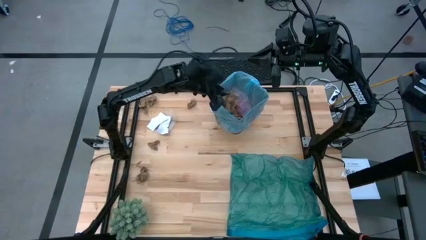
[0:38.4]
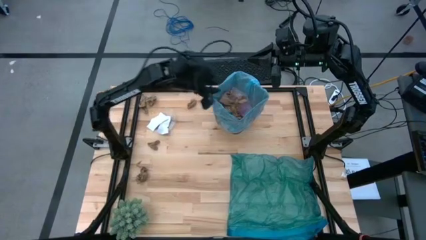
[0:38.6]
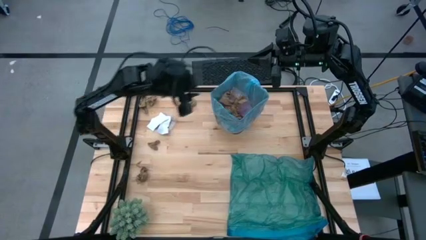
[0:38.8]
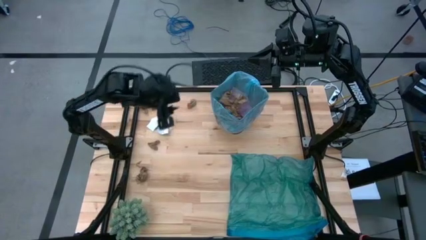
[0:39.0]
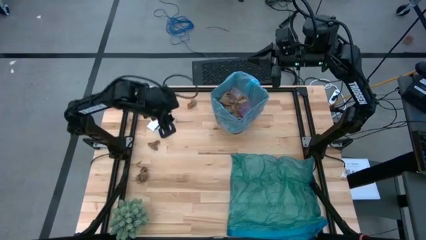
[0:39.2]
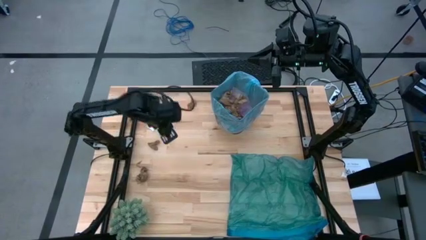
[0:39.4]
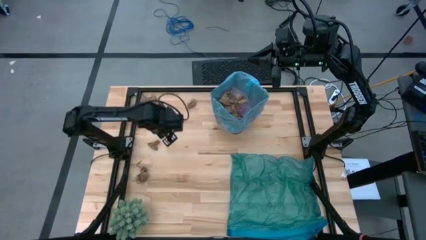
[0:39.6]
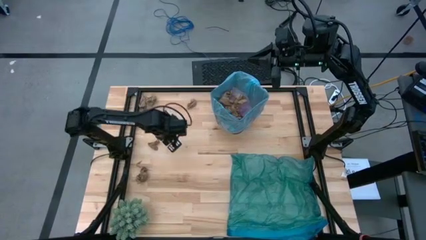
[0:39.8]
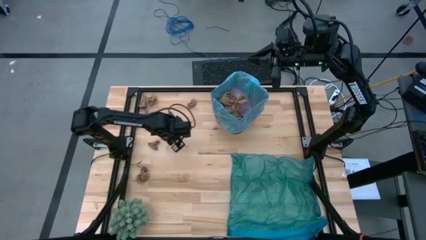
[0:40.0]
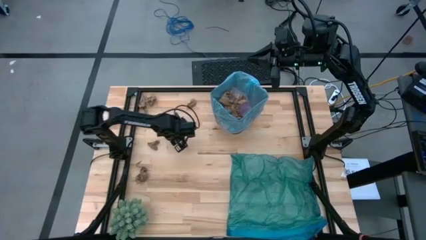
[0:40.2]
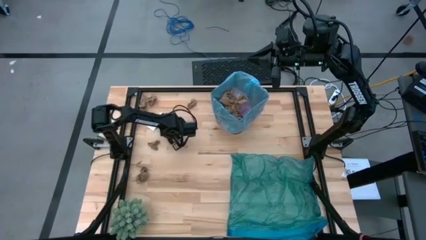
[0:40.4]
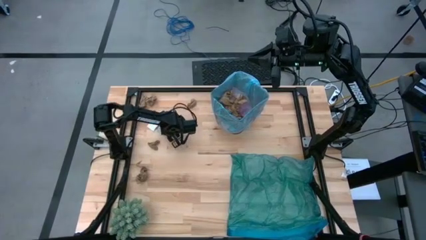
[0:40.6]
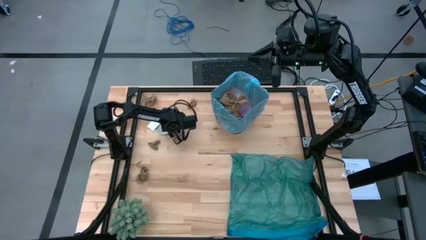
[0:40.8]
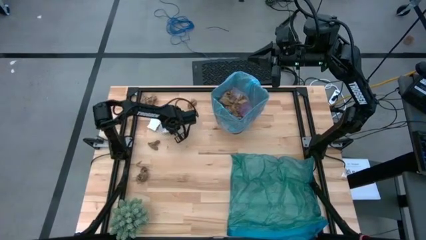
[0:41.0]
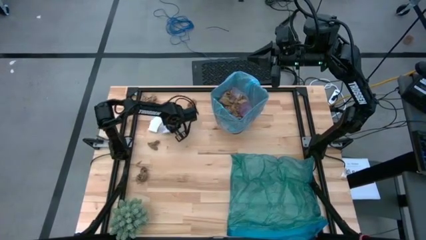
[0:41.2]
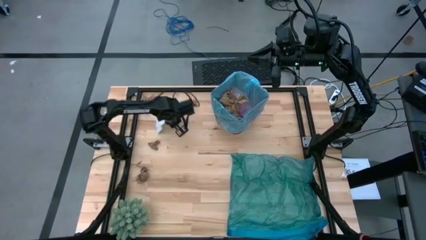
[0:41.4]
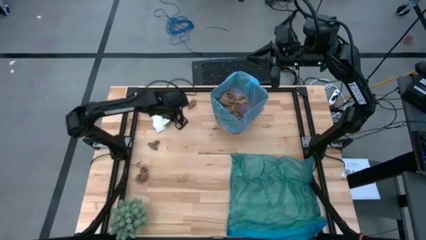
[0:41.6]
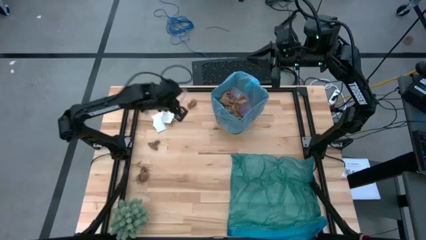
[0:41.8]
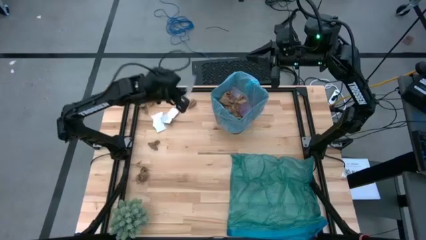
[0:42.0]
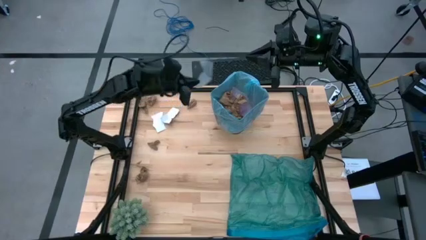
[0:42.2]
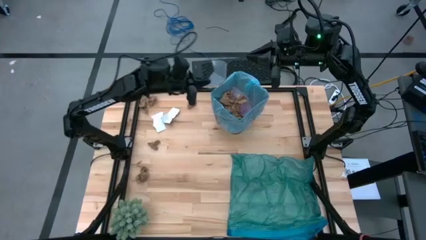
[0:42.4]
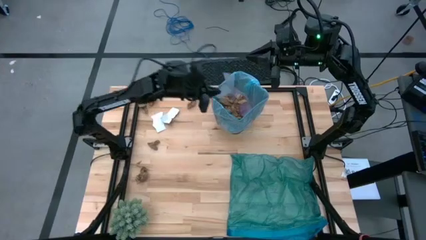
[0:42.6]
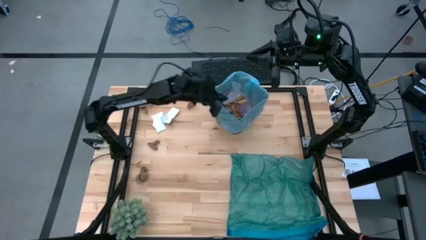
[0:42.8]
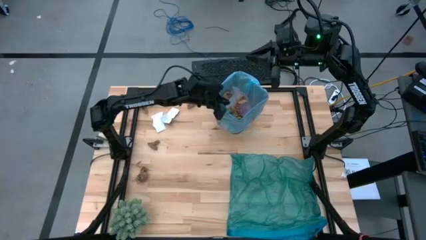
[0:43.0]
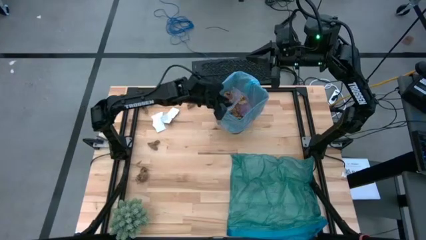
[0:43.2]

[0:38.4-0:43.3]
Task: place trash/remove bag and relplace
Put the transparent plastic into the black trash bin

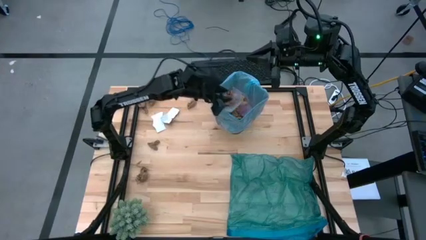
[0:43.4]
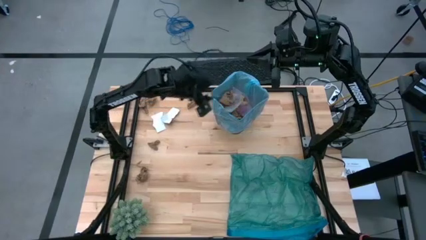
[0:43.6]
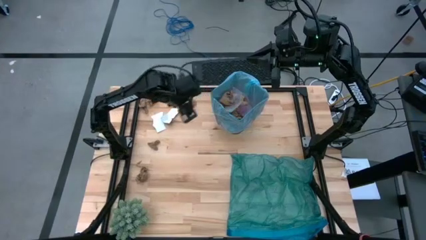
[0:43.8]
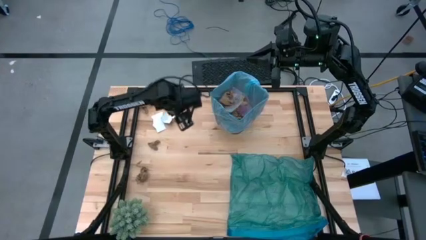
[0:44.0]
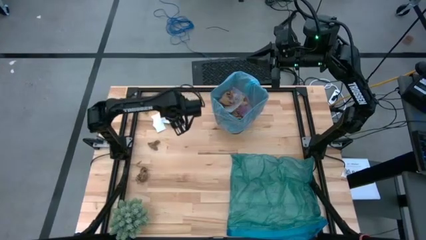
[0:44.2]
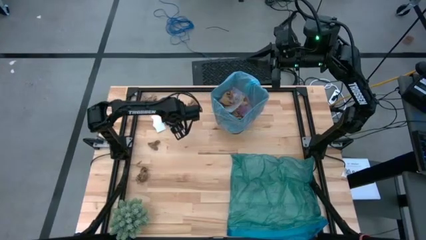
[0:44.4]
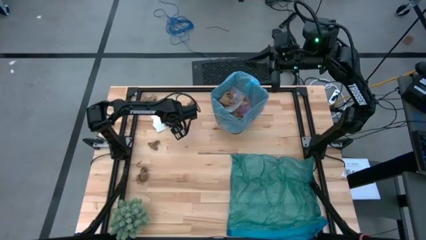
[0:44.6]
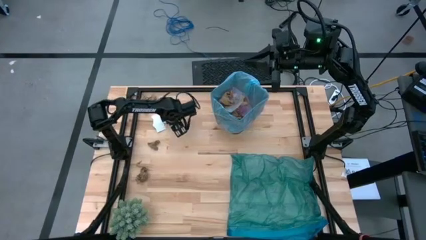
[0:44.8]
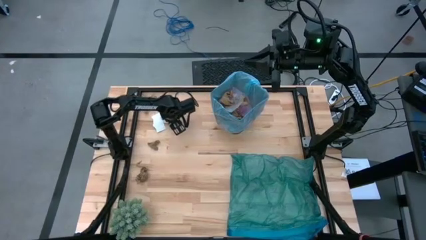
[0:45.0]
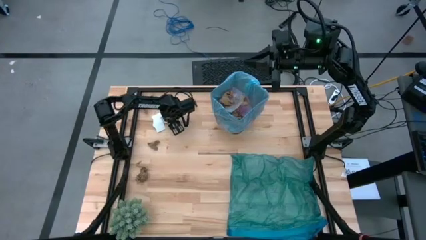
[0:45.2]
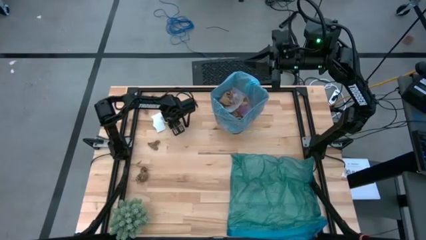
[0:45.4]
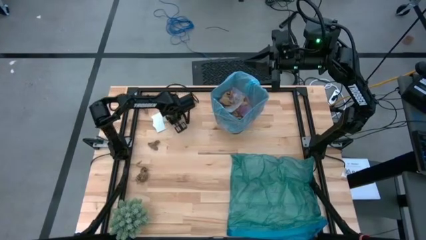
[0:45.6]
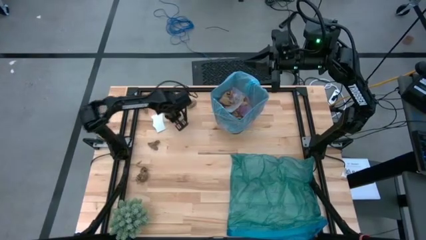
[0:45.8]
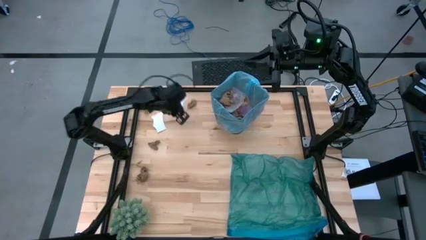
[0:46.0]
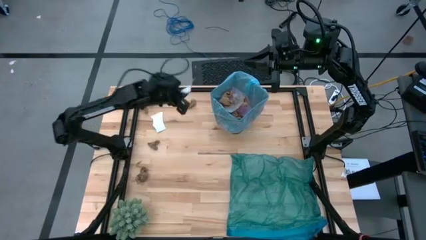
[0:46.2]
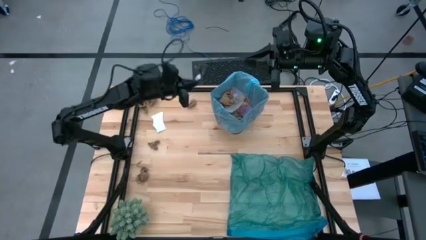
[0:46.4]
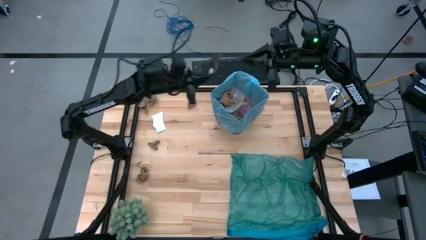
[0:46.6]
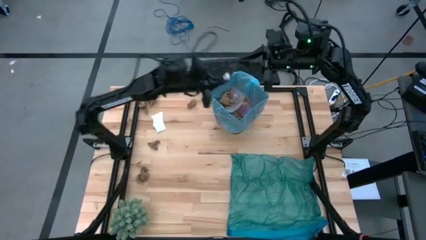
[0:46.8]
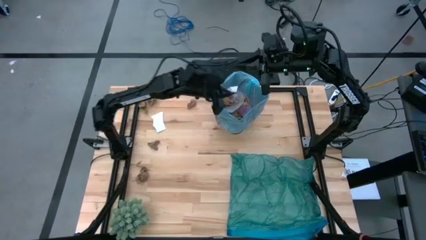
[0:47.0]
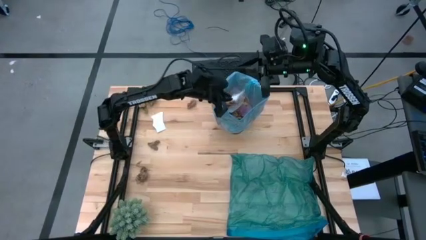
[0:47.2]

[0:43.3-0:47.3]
Put the white paper into the black trash bin

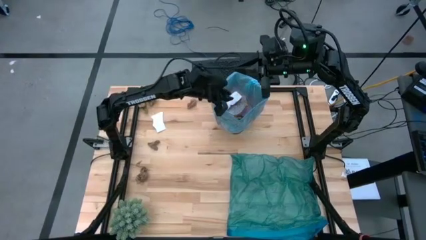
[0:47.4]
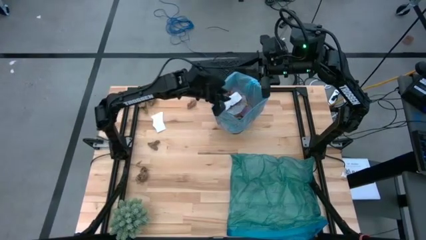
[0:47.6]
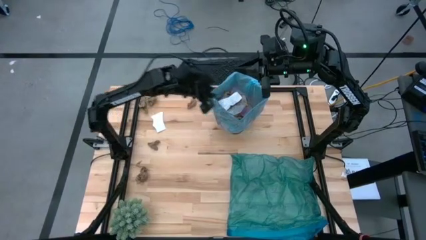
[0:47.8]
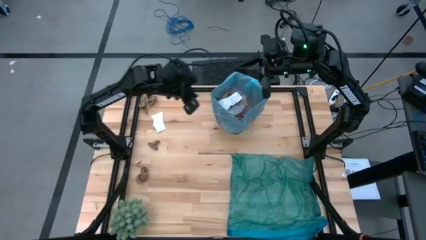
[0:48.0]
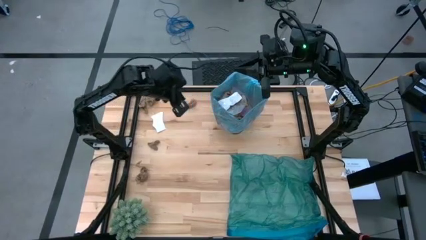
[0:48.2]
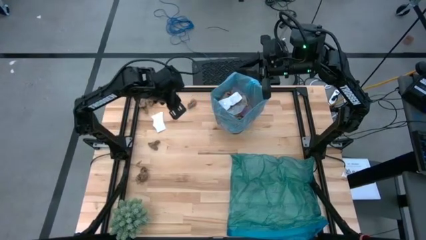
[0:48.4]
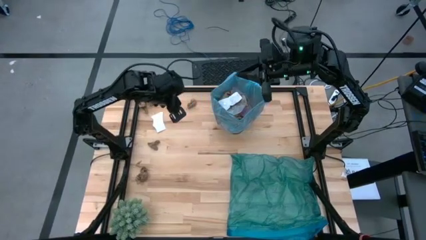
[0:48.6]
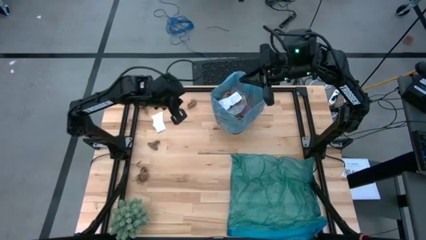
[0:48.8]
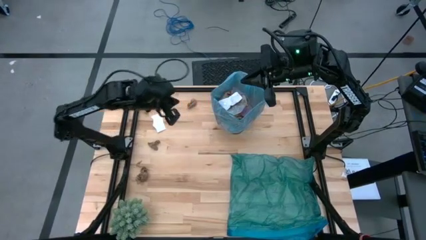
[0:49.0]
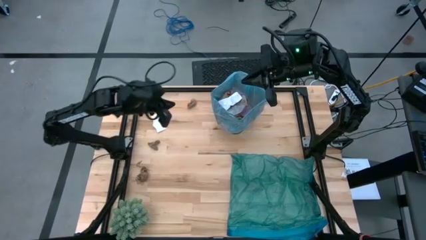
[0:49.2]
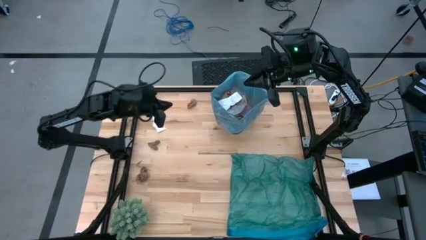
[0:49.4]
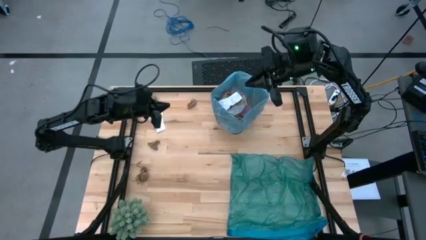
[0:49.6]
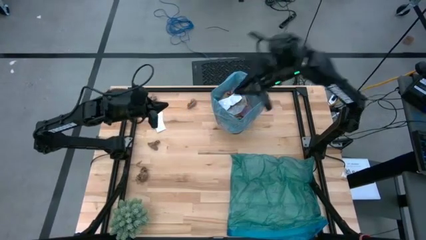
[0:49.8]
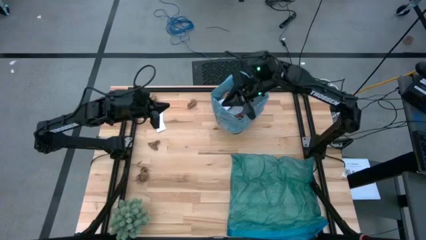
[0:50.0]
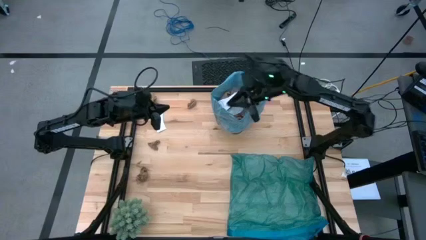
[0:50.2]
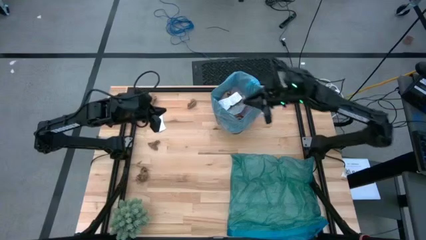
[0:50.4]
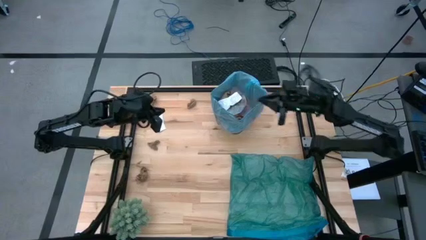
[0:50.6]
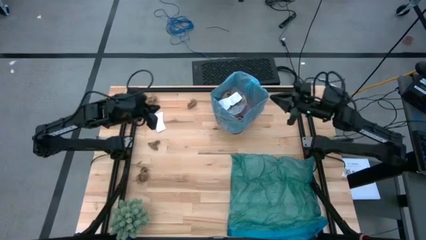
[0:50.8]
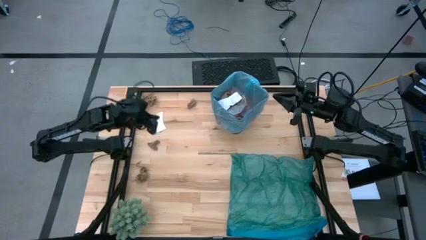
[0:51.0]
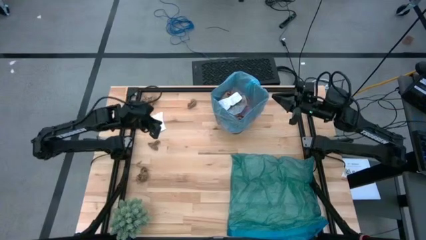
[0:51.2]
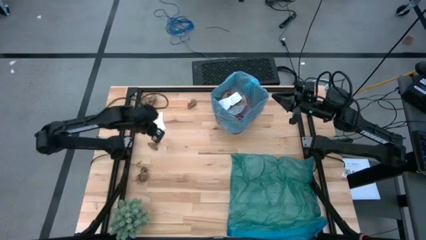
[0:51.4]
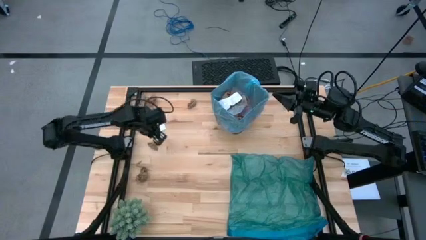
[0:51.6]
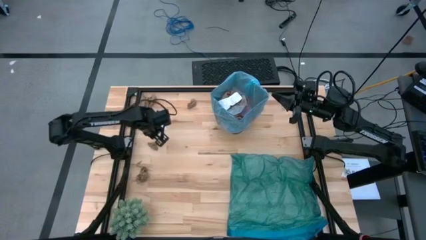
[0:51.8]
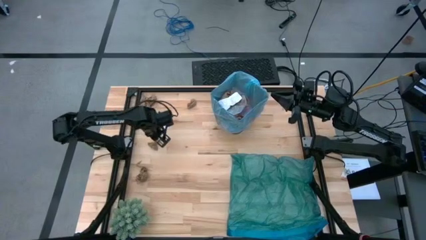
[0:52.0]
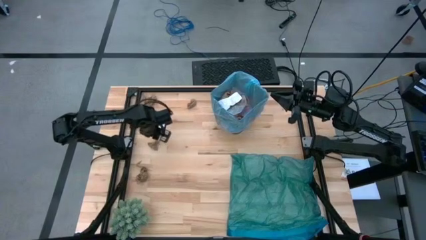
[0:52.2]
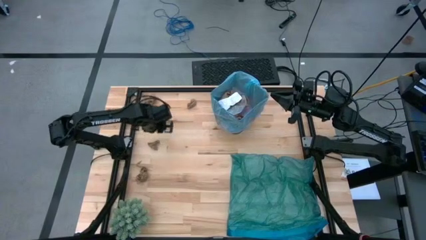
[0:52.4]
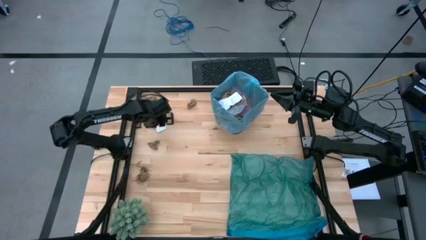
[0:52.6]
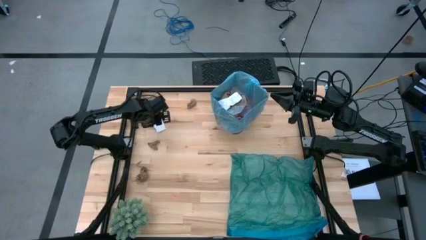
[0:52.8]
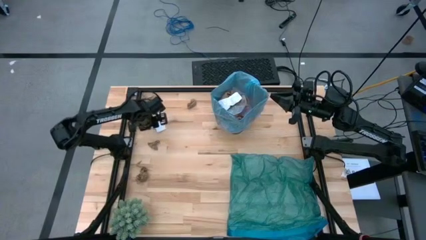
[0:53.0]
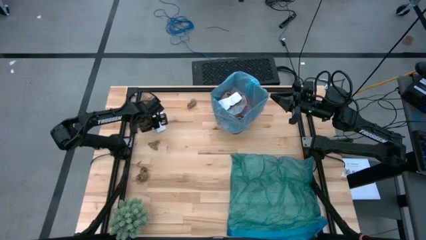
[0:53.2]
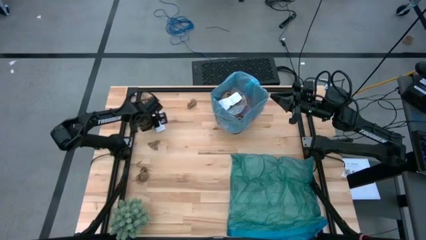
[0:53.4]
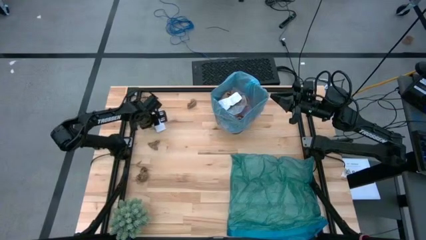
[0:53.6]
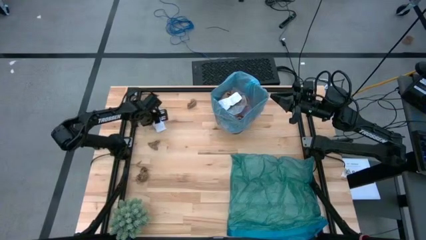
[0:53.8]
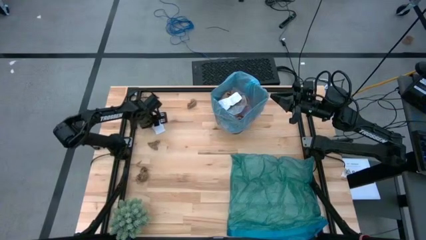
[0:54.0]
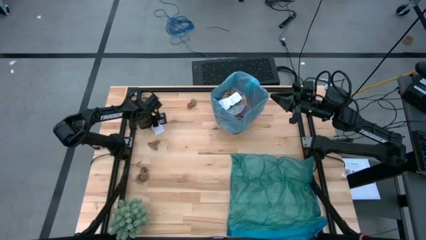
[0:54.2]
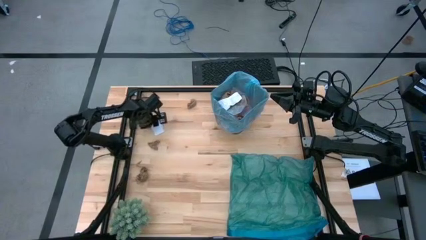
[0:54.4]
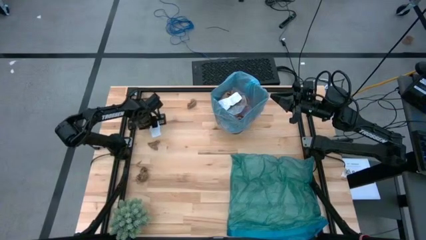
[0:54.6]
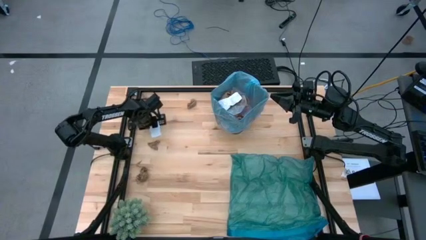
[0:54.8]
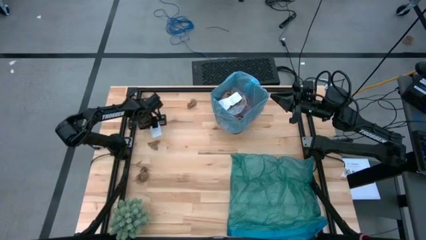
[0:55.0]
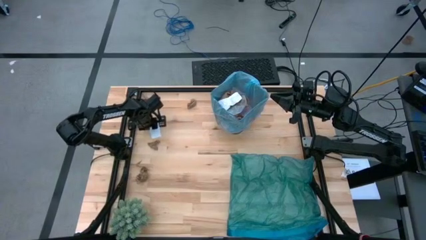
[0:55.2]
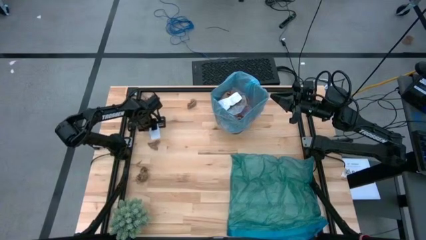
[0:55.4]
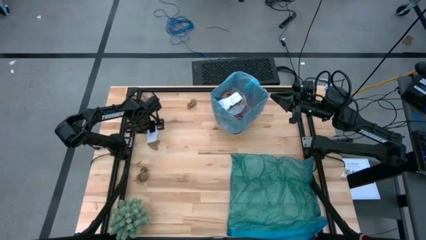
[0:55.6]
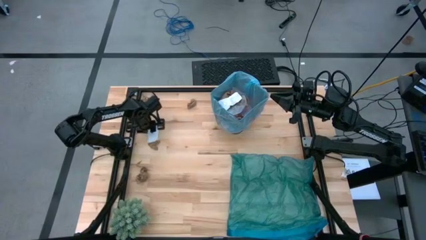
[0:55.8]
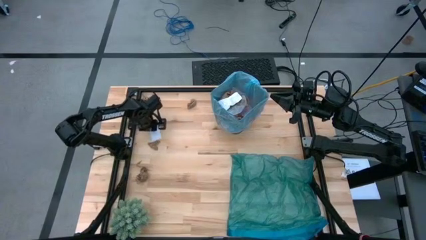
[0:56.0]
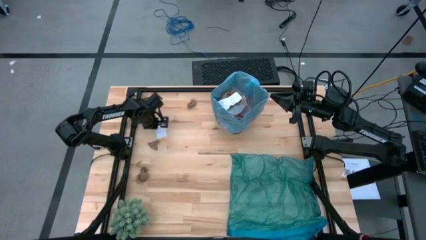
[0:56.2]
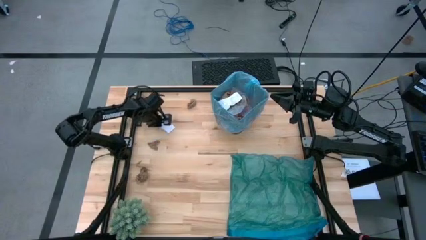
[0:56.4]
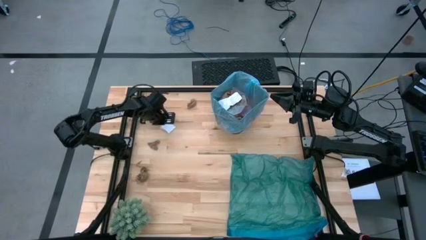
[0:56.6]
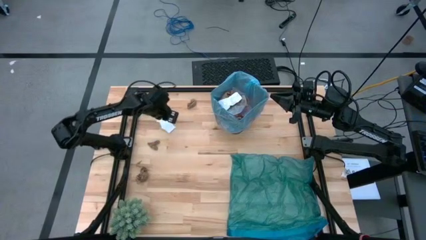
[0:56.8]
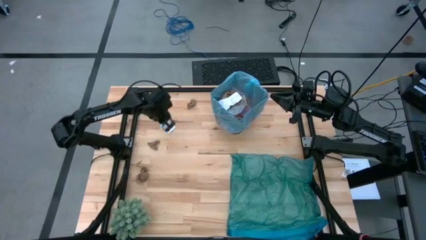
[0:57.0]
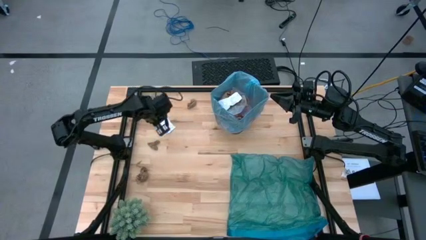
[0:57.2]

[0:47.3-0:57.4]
Put the white paper into the black trash bin
